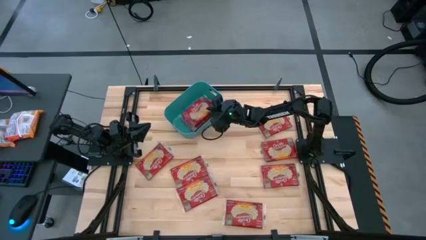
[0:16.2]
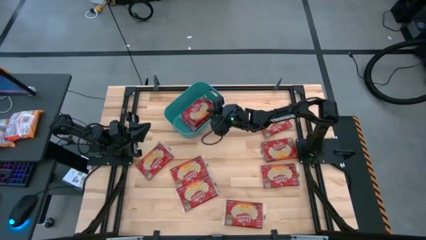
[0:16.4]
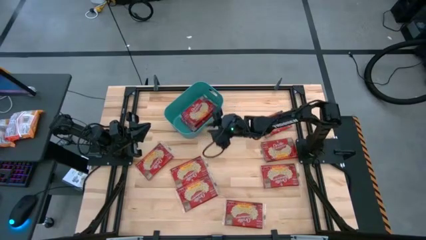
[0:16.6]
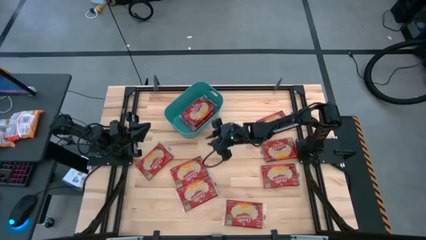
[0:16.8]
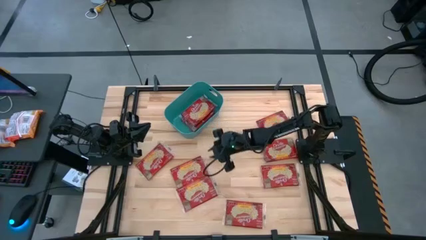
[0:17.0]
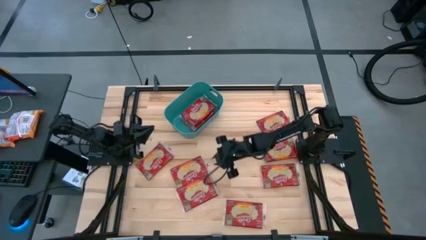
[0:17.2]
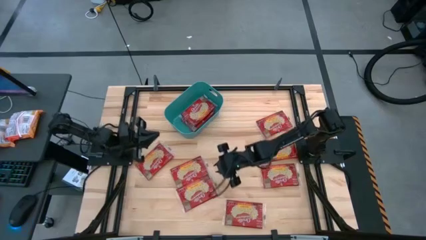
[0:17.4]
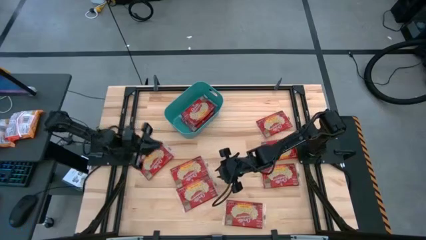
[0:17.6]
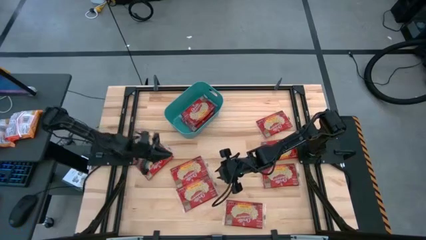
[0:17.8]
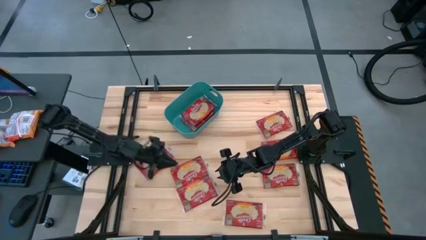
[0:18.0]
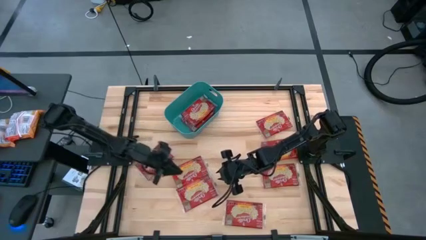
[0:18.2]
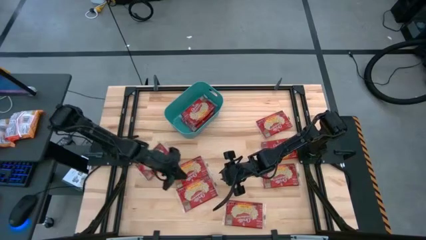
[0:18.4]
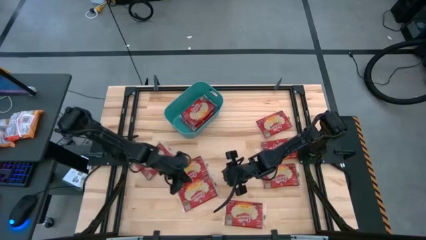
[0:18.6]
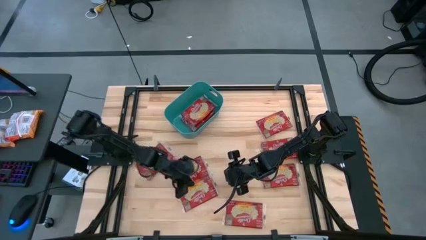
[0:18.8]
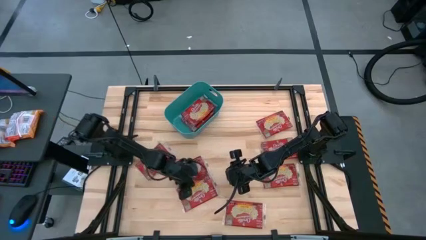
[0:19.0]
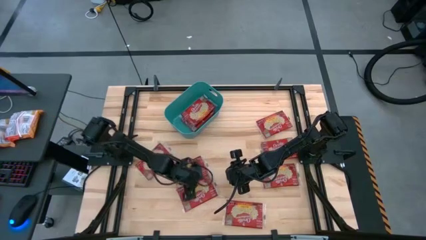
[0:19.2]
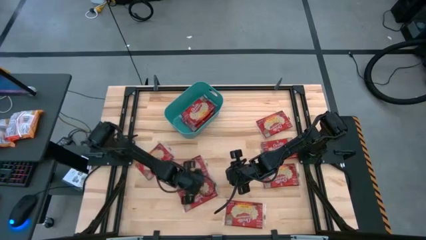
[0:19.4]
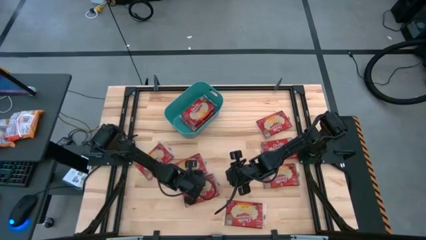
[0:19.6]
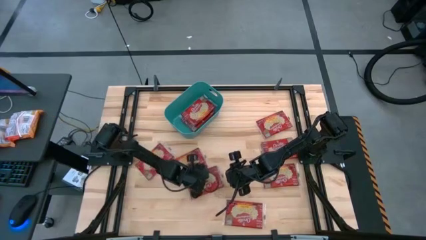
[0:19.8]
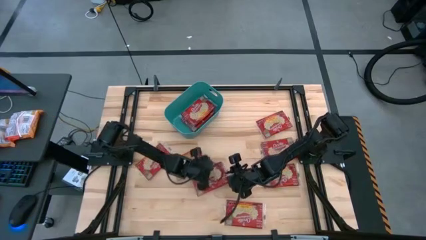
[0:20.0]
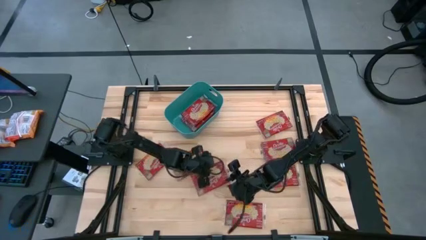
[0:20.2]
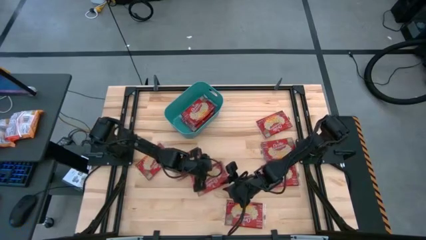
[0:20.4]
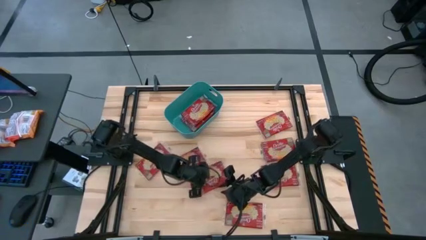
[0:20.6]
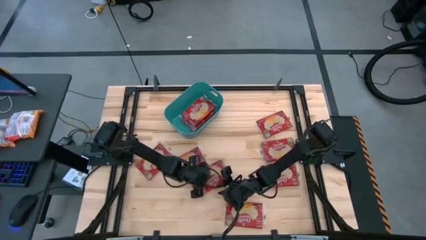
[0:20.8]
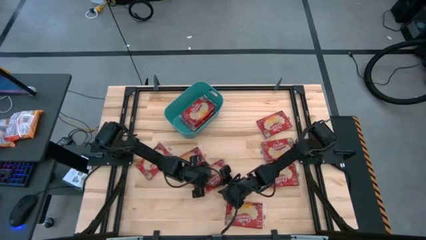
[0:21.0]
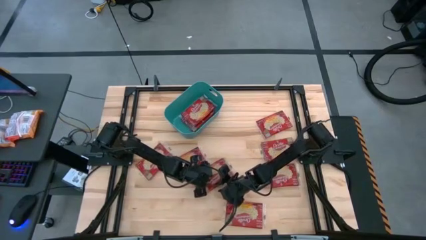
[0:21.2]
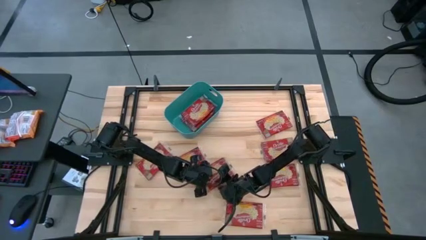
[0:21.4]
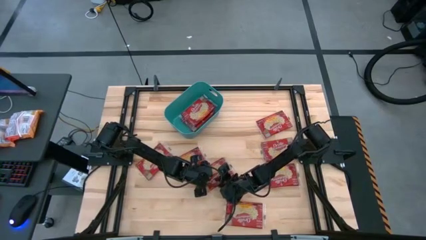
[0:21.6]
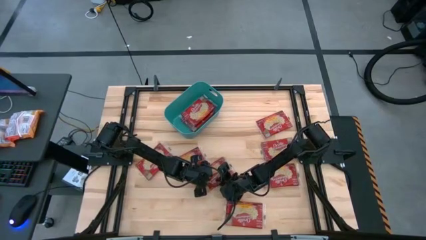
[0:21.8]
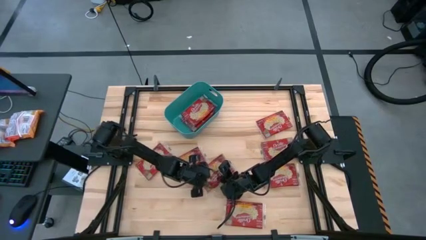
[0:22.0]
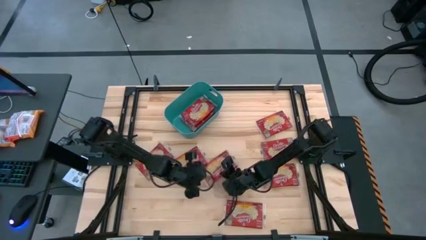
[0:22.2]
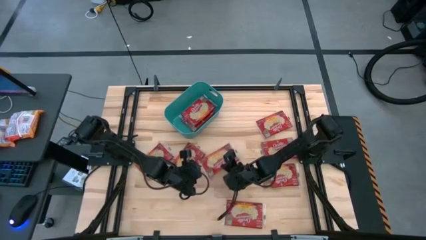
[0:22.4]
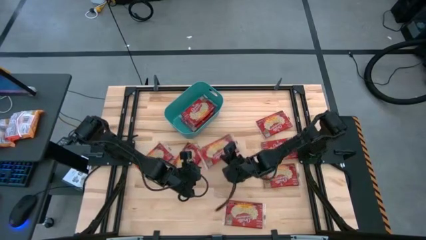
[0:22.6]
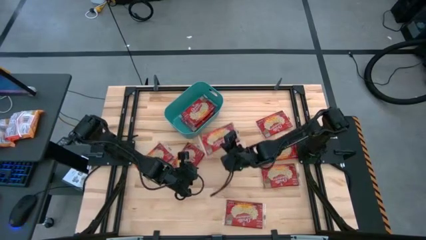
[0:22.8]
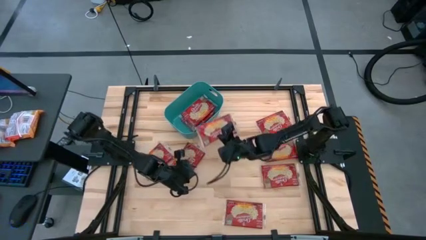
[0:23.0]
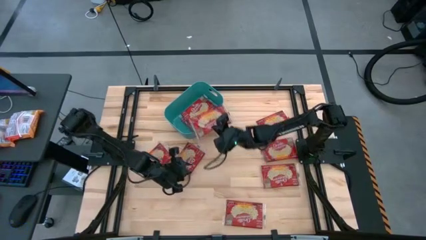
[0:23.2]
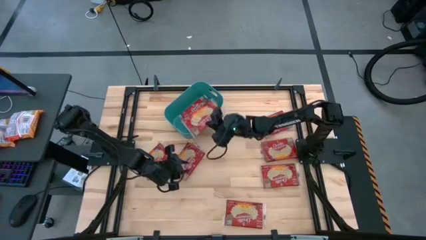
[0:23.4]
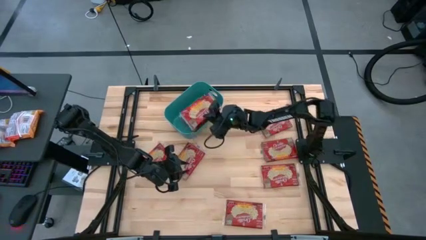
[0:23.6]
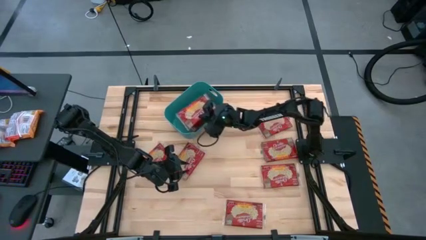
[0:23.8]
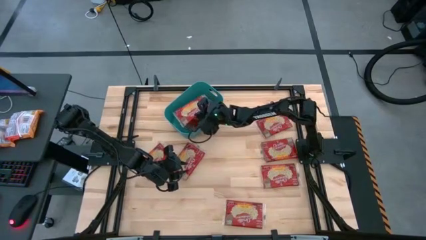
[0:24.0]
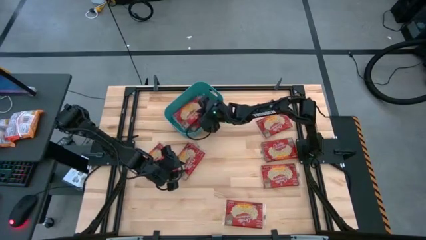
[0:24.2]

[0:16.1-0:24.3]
Task: Sort popcorn bags into baskets
Put the red popcorn pack into the blue bin

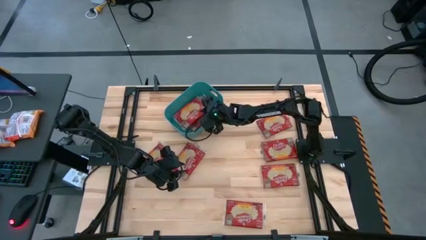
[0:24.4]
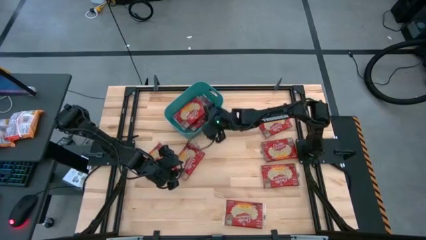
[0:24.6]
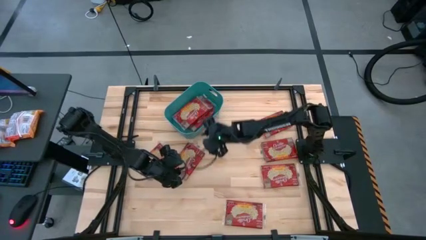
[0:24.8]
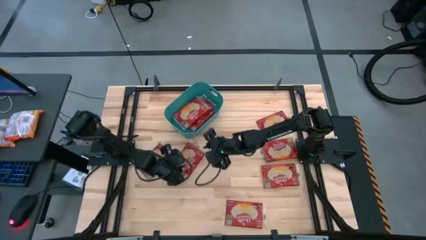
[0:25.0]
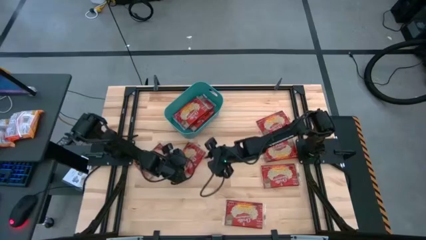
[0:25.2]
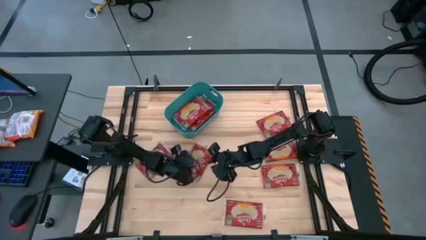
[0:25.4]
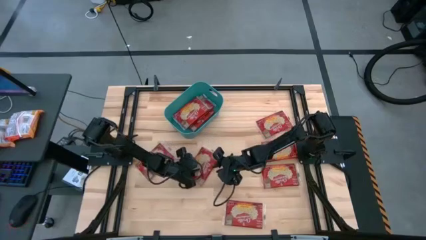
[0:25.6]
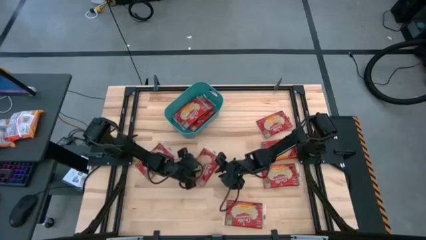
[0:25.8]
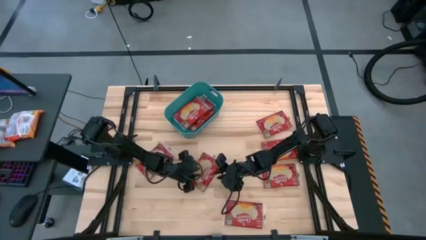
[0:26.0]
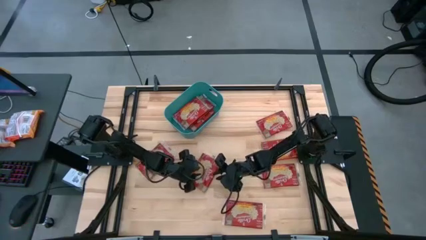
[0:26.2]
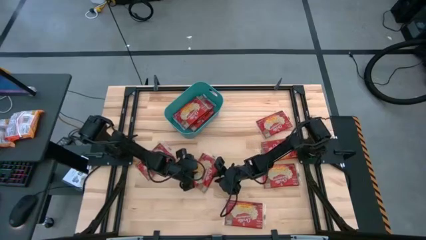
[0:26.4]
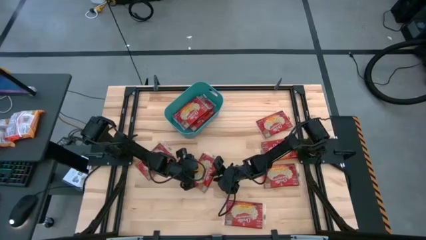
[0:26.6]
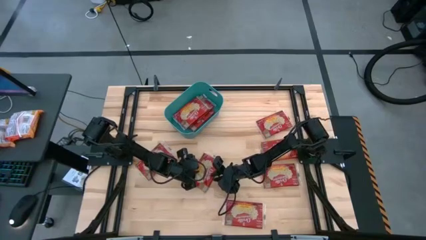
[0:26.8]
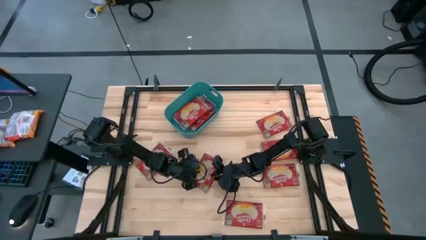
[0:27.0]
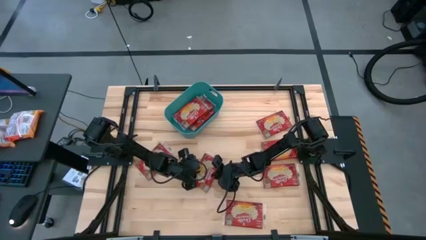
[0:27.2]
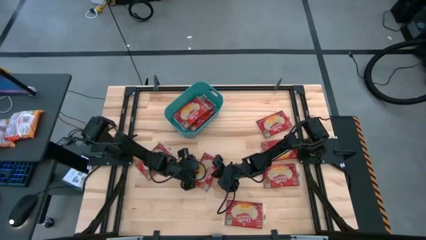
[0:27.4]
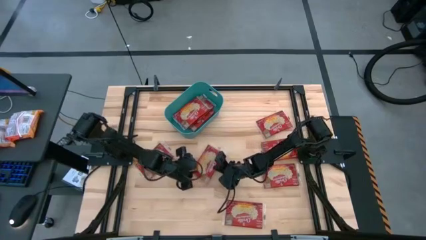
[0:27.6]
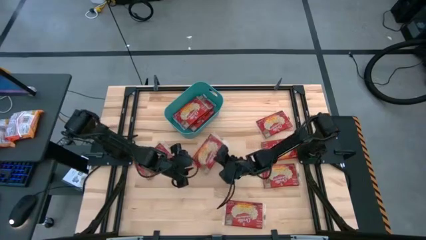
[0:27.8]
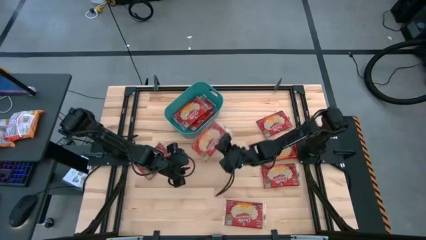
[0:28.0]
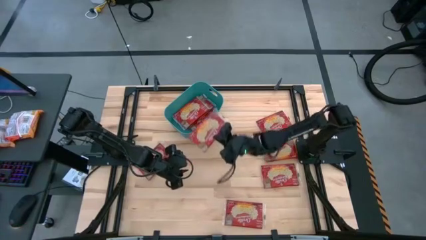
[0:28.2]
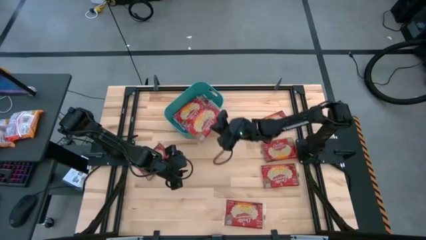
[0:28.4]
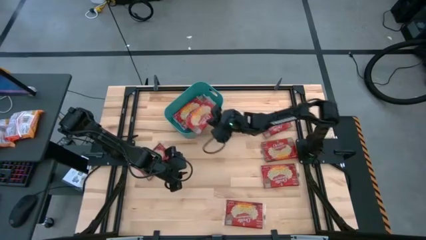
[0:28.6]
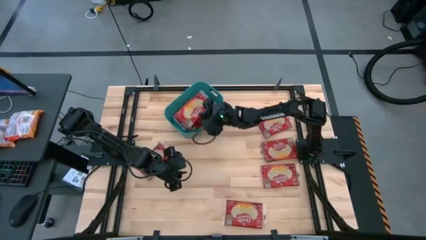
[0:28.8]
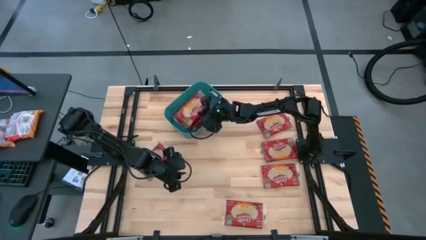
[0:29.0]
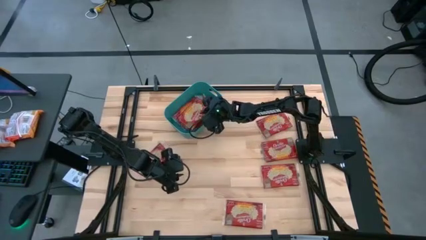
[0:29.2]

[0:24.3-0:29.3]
Put the red popcorn pack into the blue bin

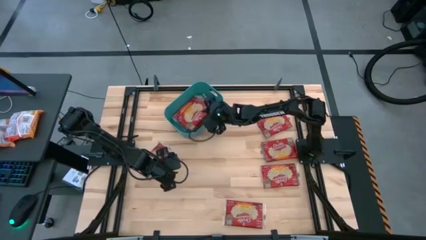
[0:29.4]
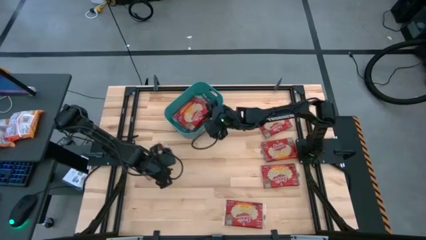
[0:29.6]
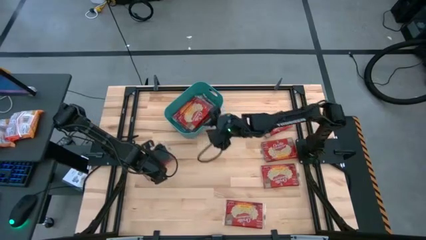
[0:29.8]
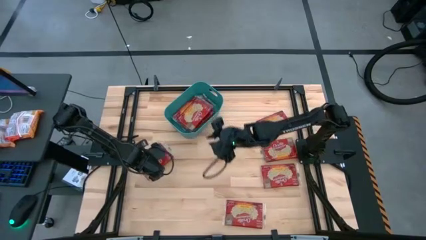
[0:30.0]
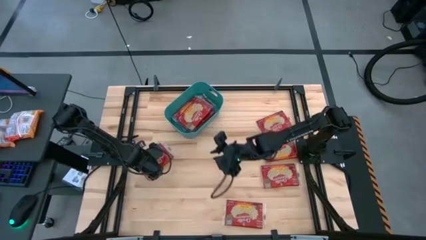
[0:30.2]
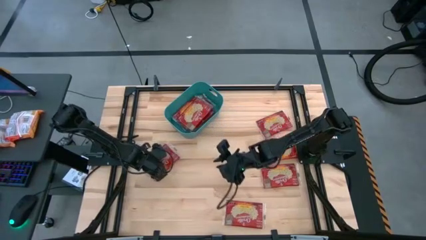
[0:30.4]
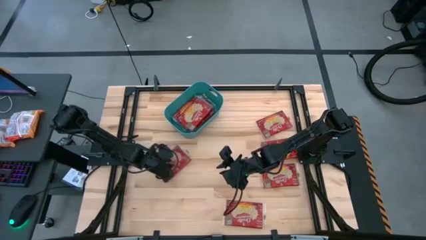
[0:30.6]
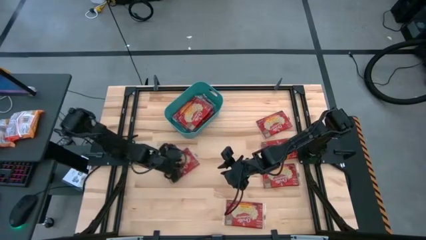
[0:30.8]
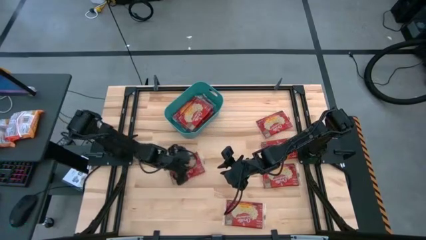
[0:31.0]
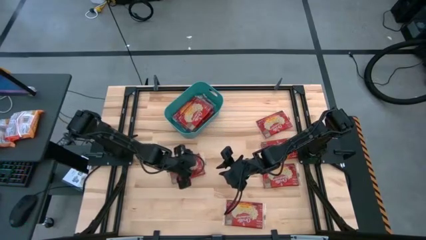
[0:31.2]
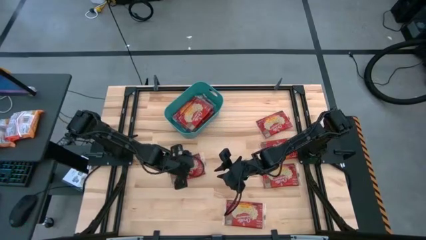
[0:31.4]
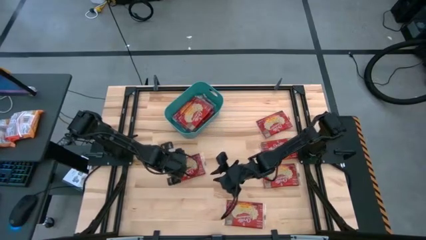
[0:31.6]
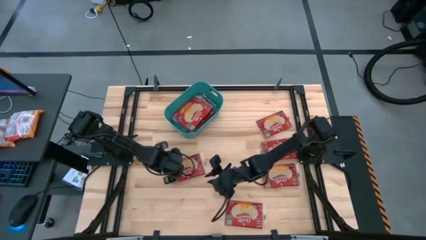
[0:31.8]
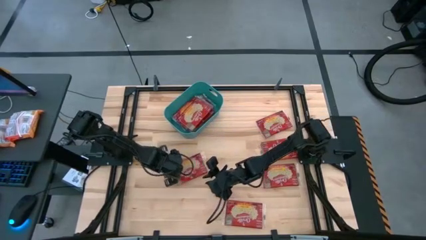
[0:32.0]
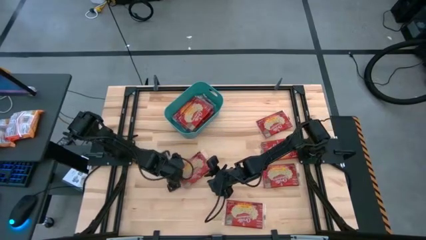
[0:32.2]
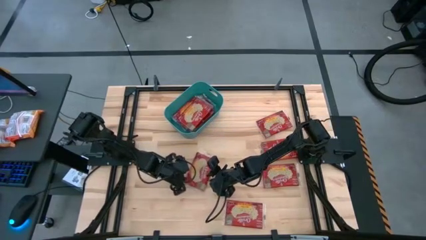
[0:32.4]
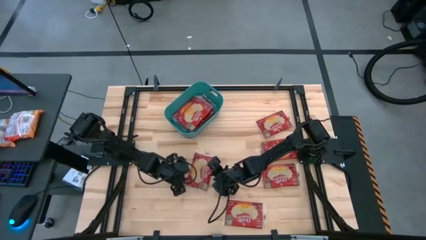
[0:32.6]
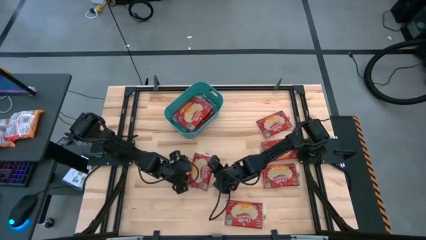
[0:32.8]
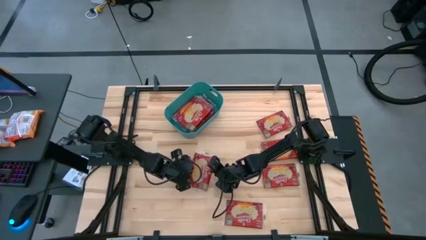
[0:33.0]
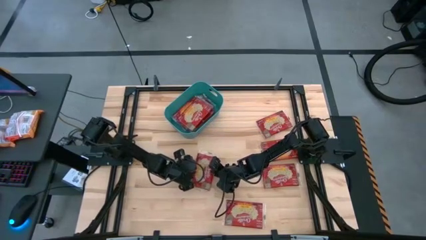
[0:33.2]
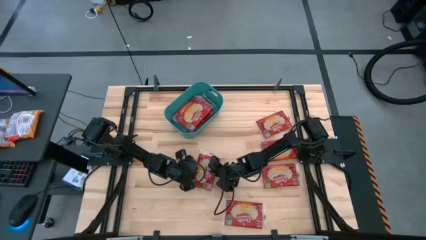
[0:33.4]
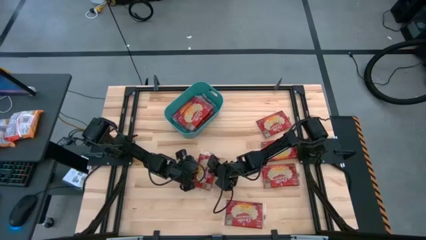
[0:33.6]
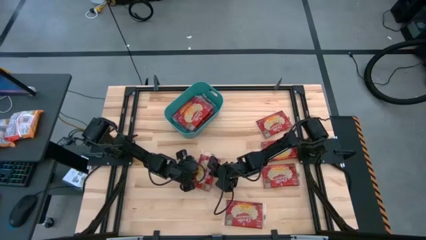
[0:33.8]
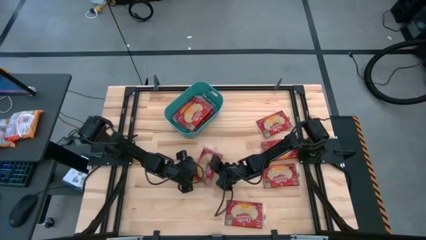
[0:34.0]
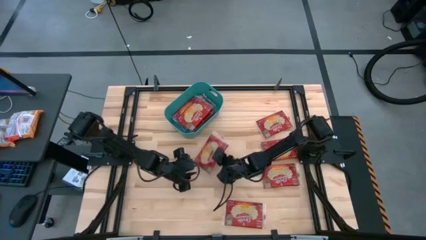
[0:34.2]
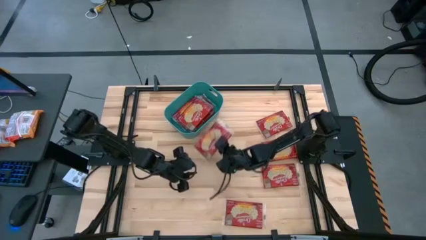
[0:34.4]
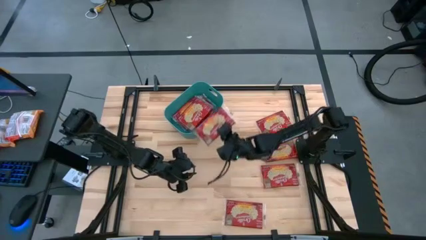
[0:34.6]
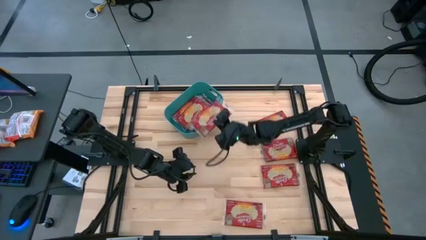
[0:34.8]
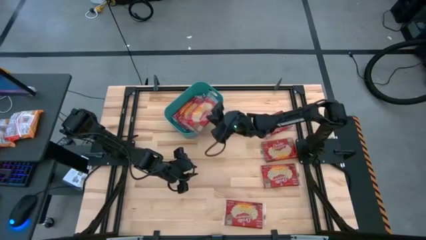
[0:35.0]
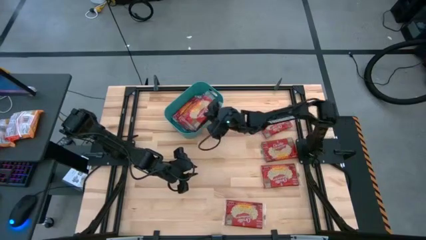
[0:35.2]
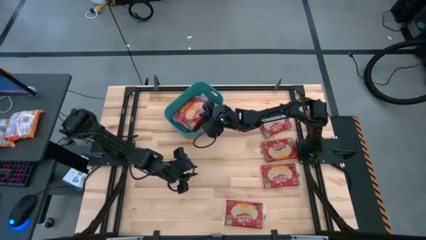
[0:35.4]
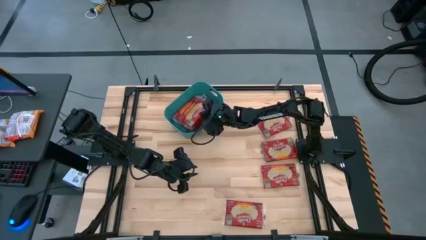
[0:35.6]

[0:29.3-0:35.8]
Put the red popcorn pack into the blue bin
